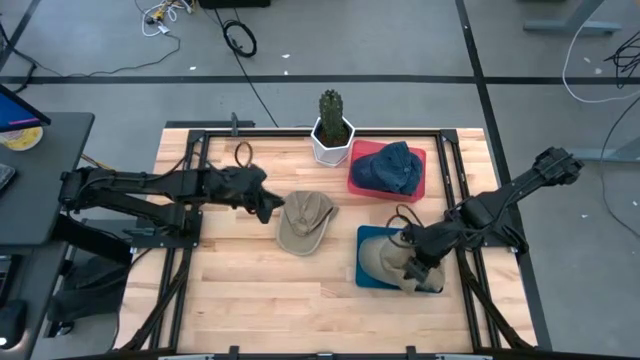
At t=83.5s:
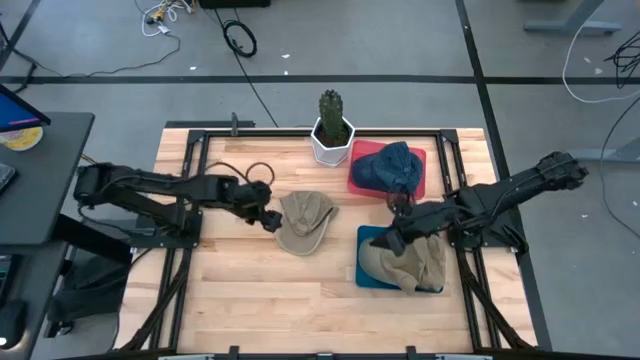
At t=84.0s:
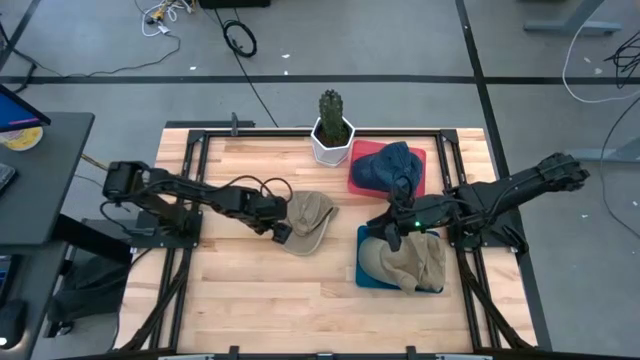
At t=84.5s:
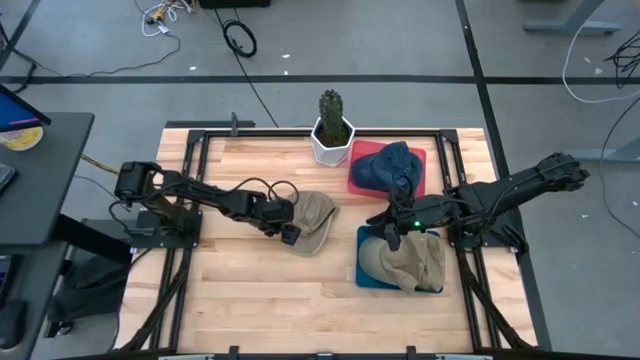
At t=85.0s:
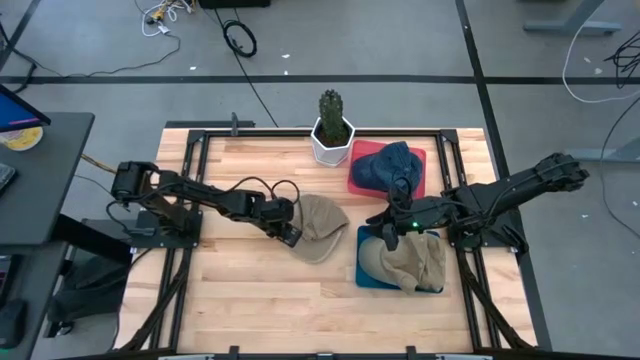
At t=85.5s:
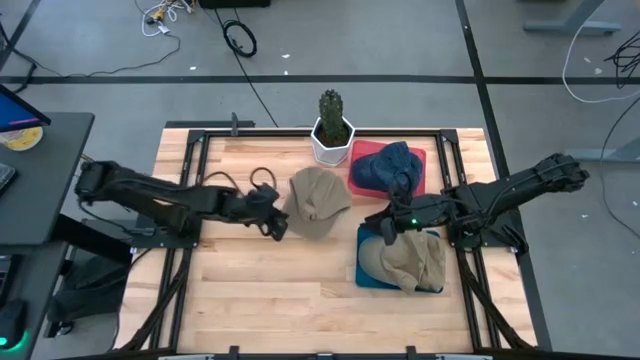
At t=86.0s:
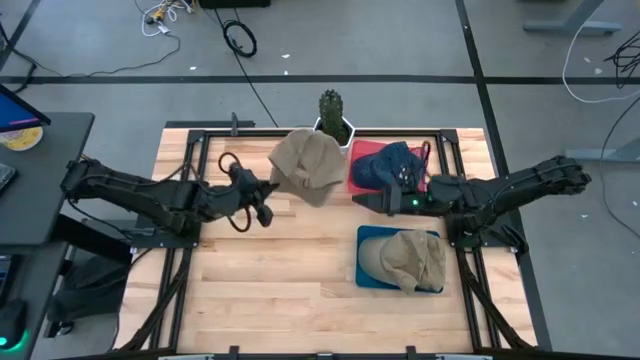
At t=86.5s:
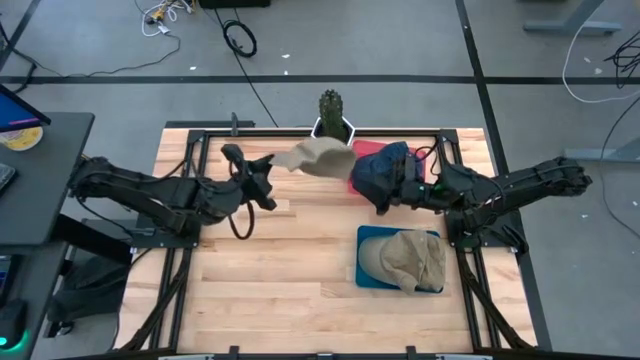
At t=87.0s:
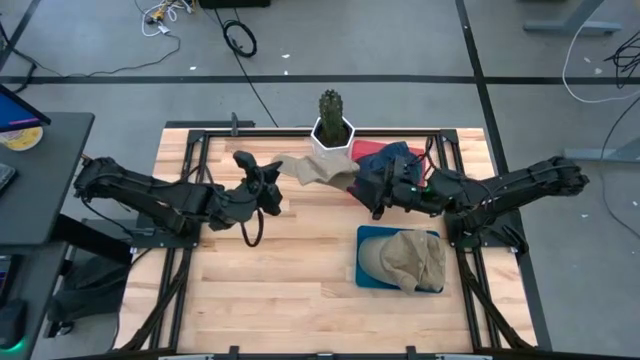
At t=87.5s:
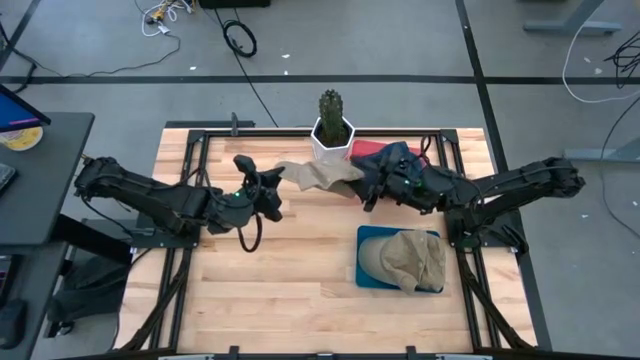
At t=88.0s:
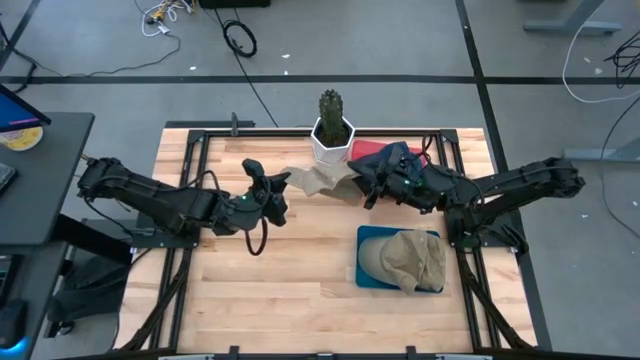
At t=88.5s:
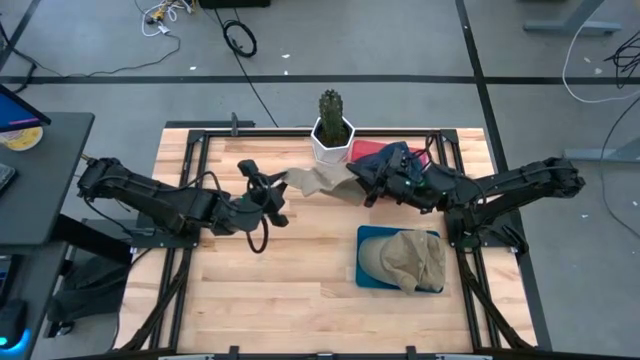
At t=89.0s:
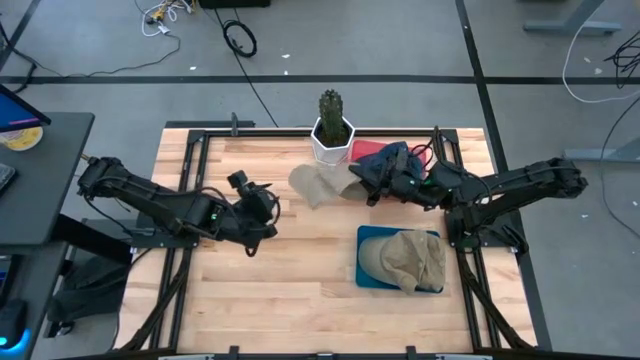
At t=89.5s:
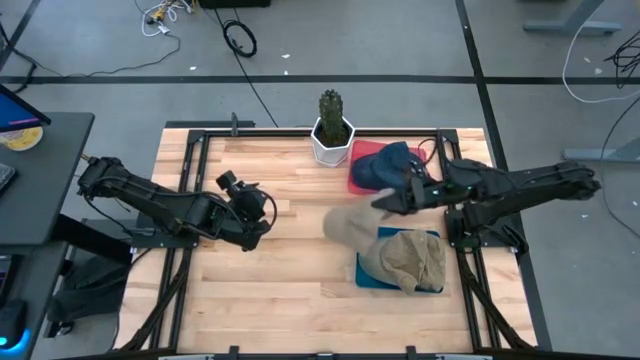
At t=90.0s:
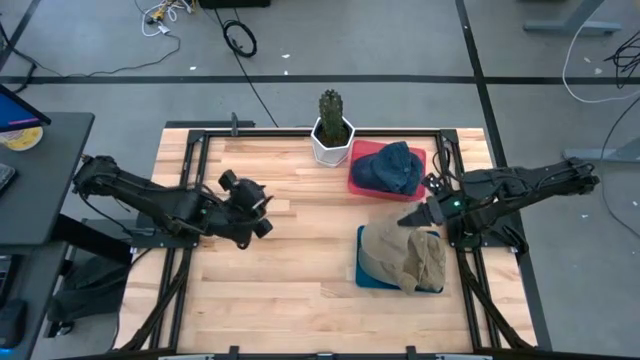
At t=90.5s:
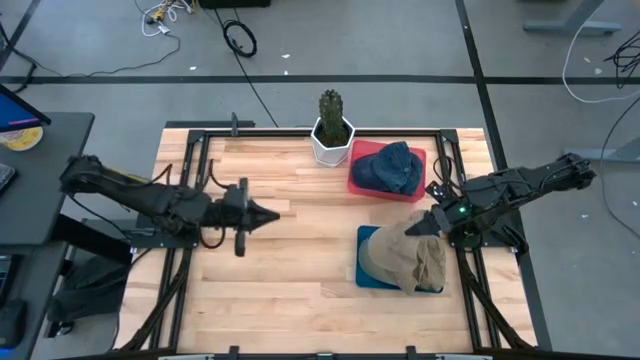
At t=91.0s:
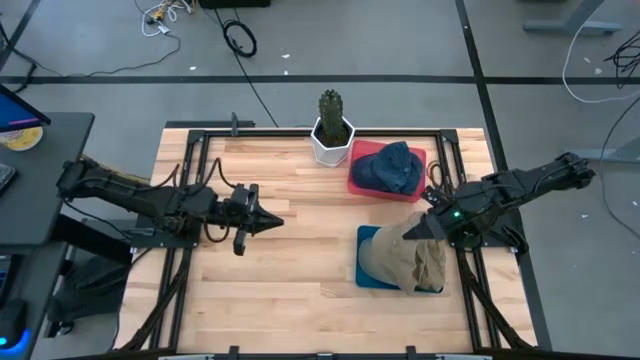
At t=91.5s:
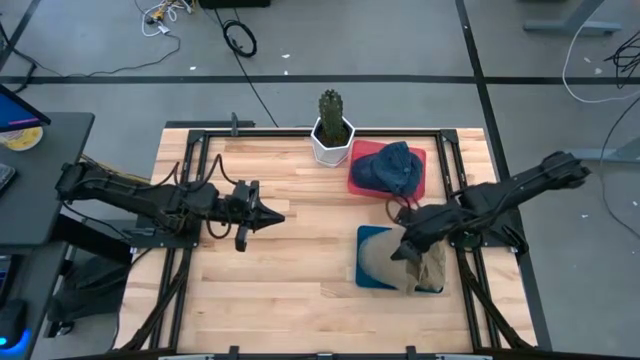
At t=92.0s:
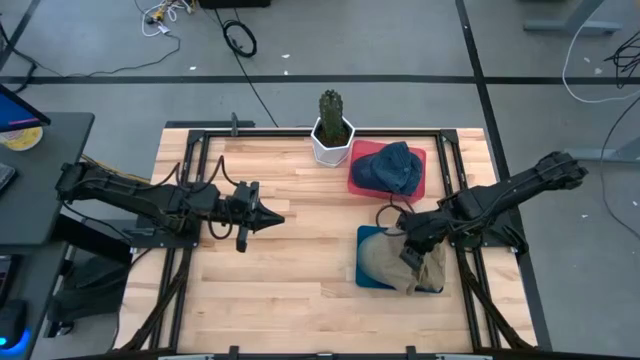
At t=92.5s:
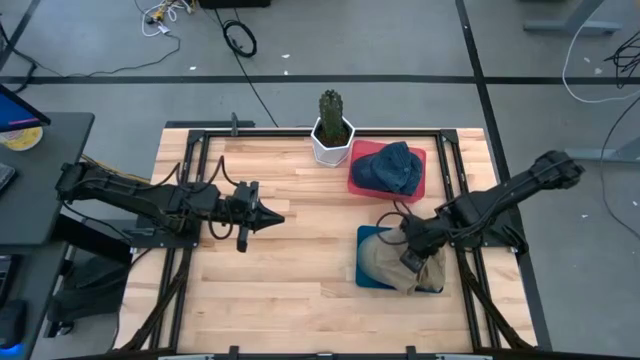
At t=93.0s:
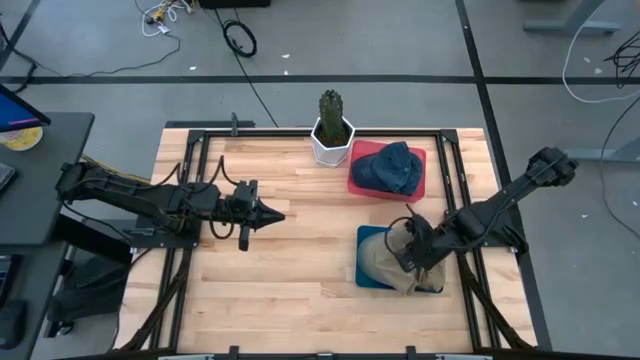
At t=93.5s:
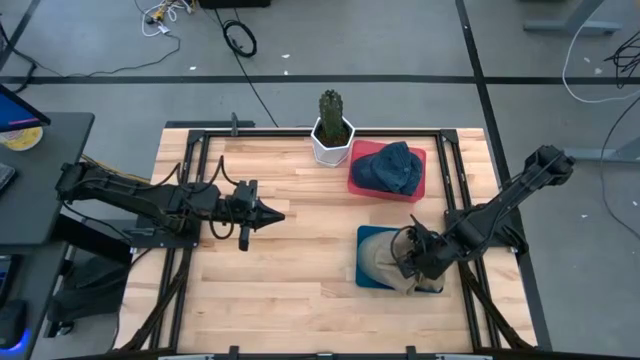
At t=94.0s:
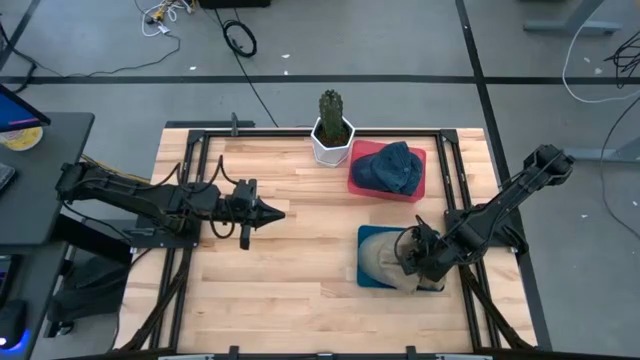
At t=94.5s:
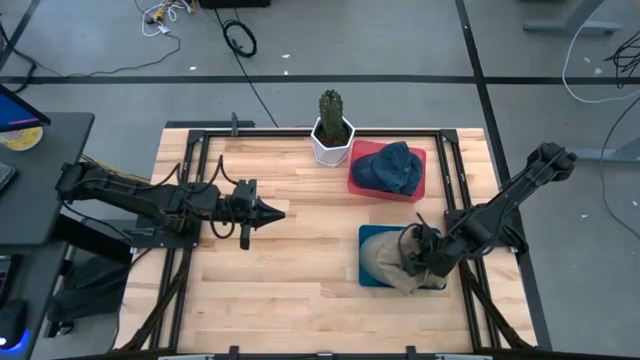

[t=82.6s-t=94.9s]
Task: Pick & Place hat
Put the brown cap into the blue bin

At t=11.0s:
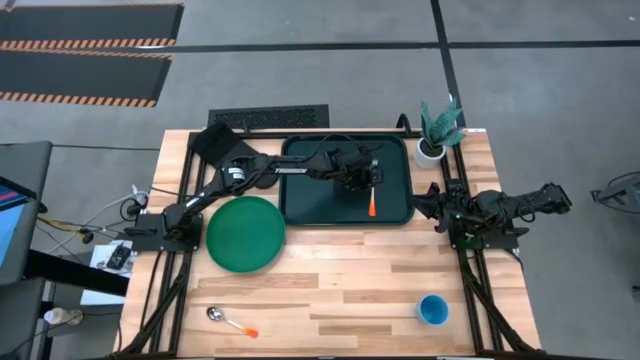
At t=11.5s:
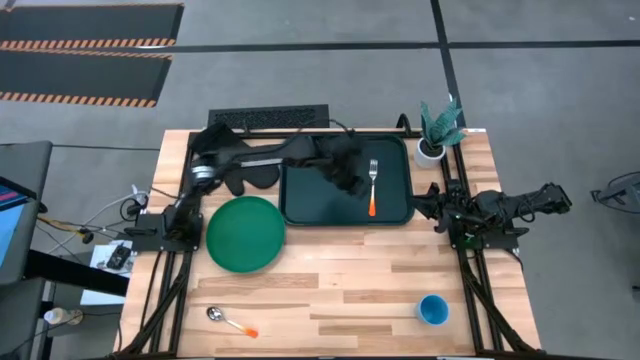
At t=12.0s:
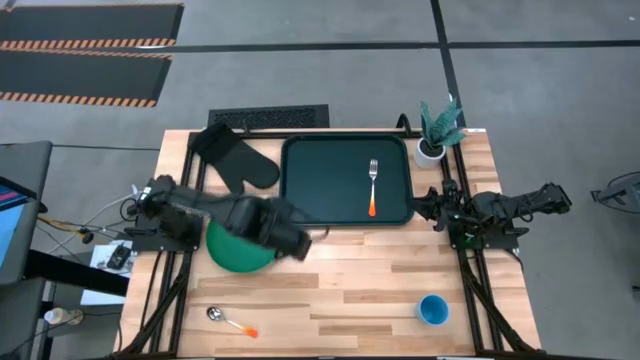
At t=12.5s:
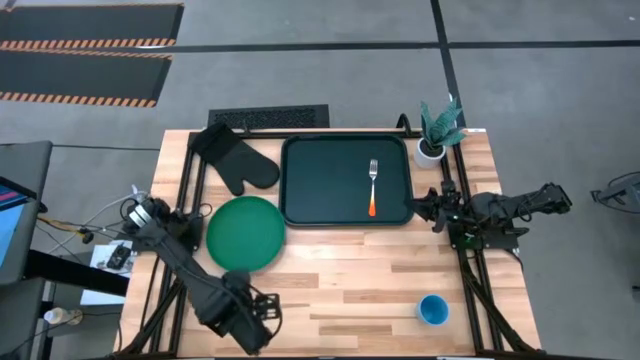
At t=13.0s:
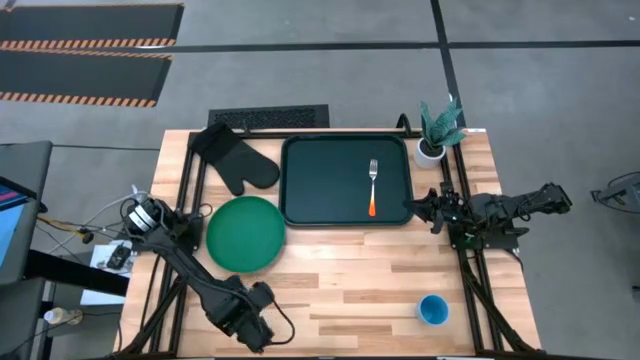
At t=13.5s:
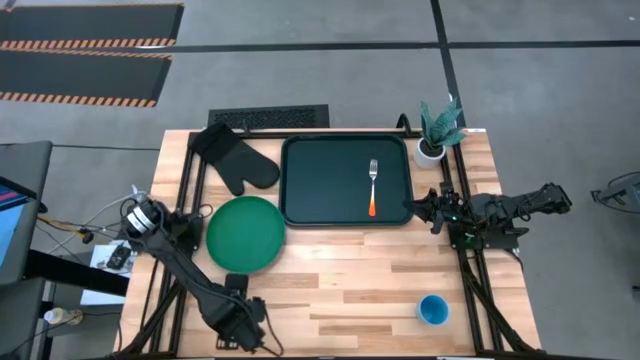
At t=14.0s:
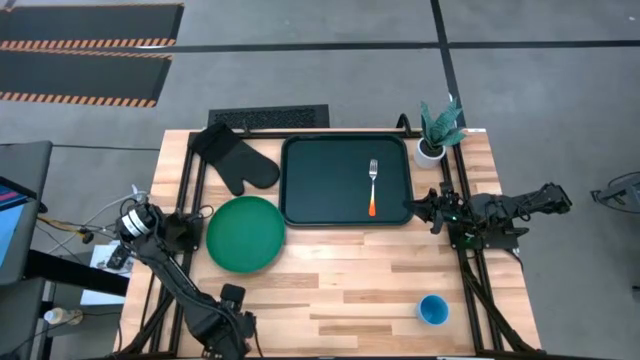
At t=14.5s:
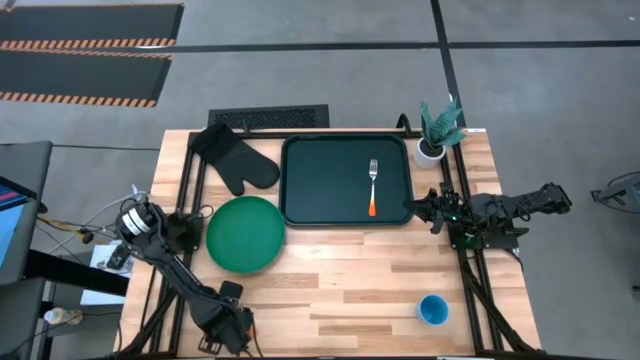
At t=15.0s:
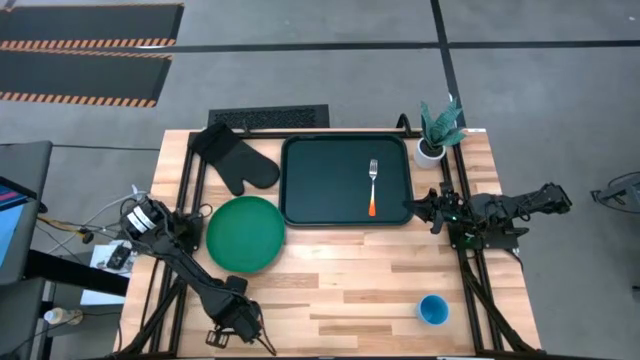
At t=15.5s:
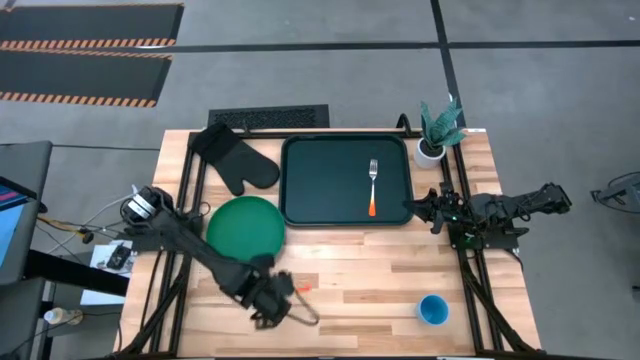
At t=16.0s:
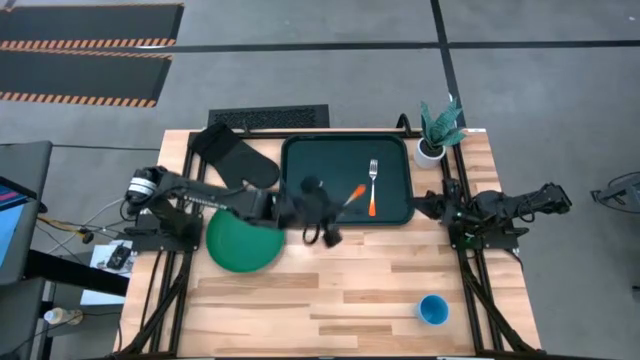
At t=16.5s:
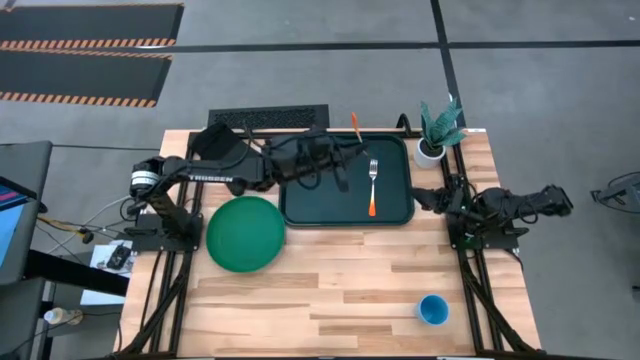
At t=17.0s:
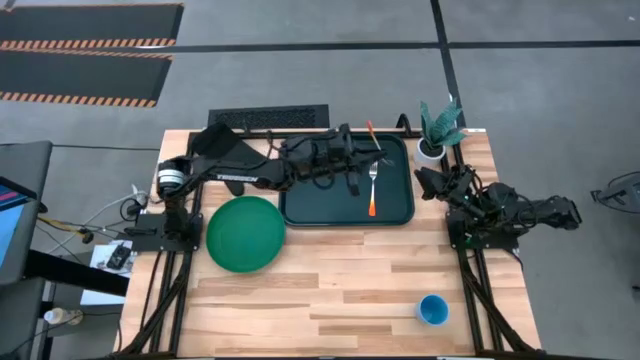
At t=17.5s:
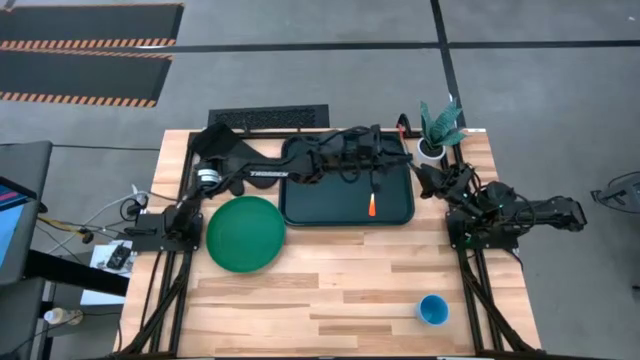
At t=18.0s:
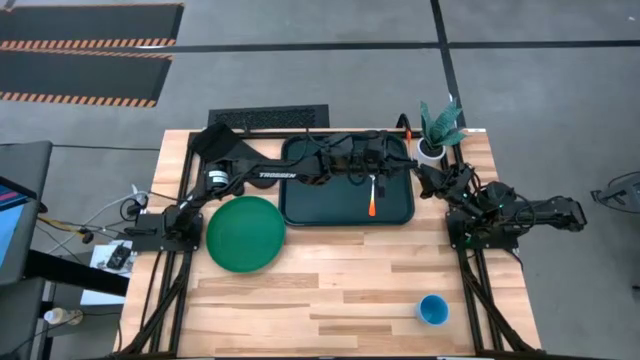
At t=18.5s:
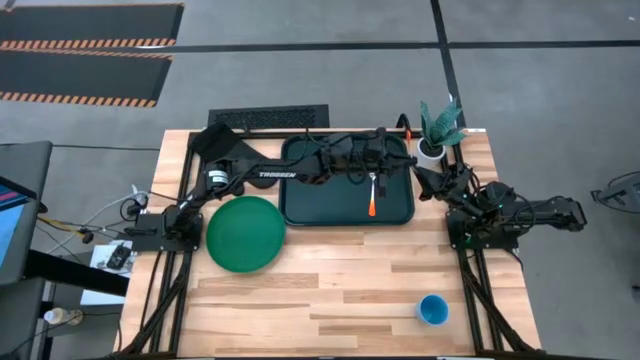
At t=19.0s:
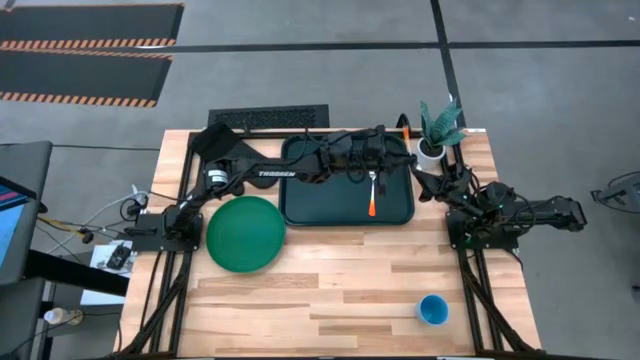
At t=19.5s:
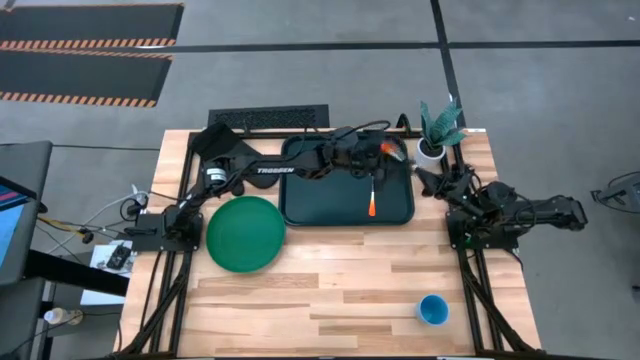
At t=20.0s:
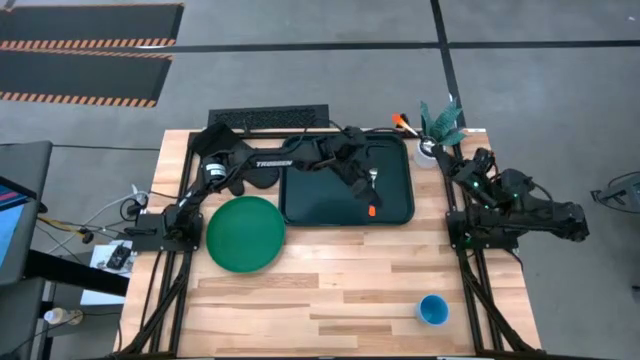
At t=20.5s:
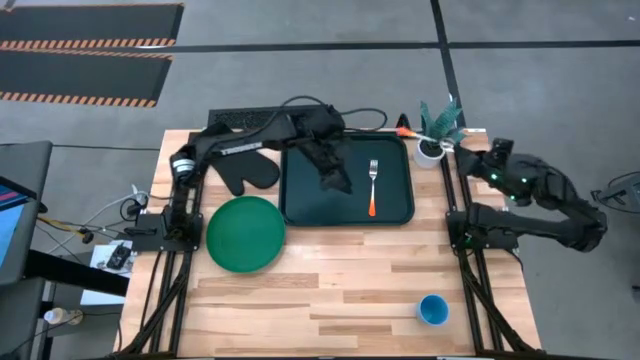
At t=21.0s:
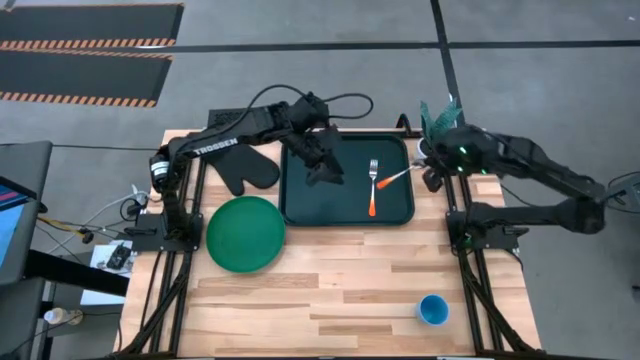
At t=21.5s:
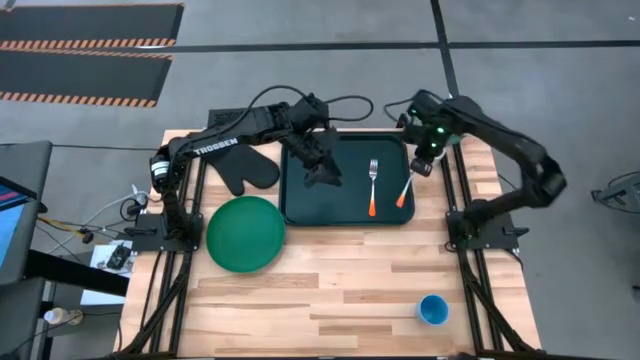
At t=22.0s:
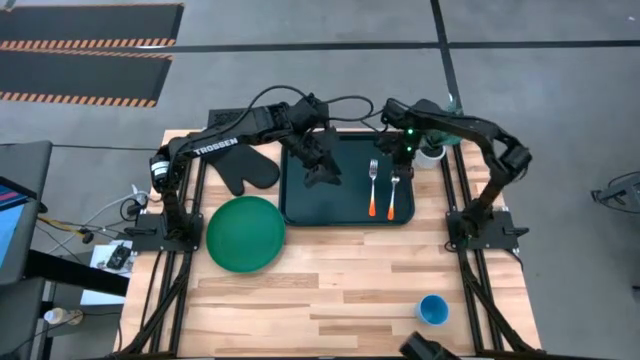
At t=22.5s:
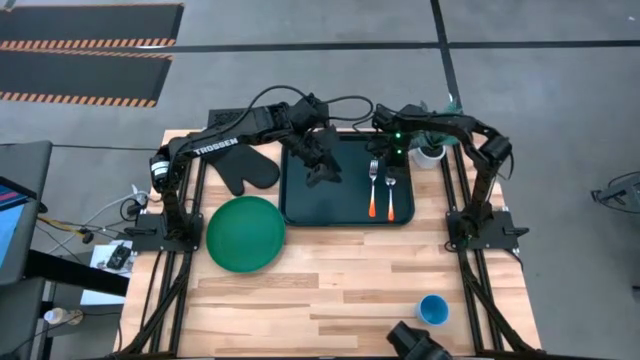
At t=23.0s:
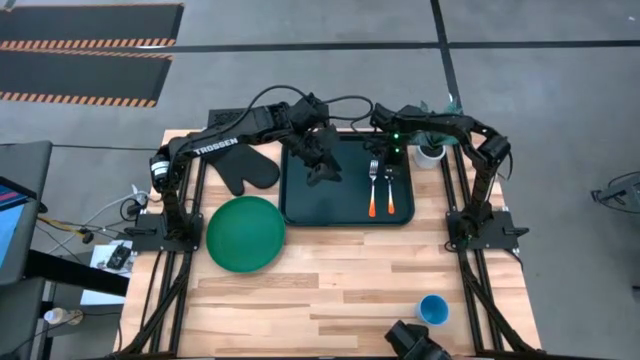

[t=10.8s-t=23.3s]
Task: Pick and place plate/cup/fork/spoon on tray
Put the orange spoon on the black tray to the right of the orange fork
